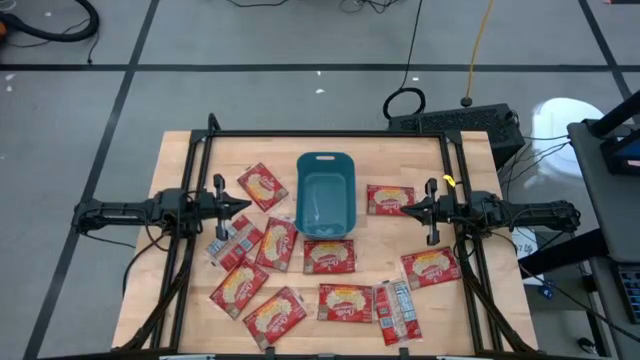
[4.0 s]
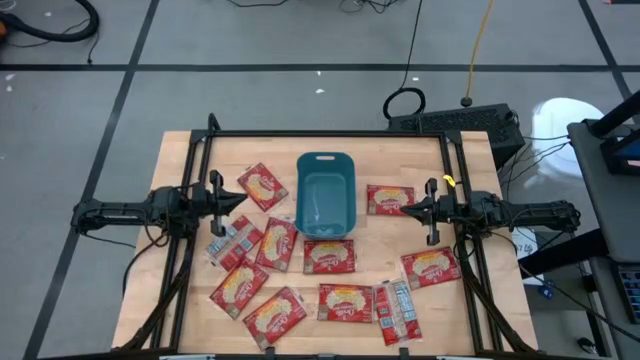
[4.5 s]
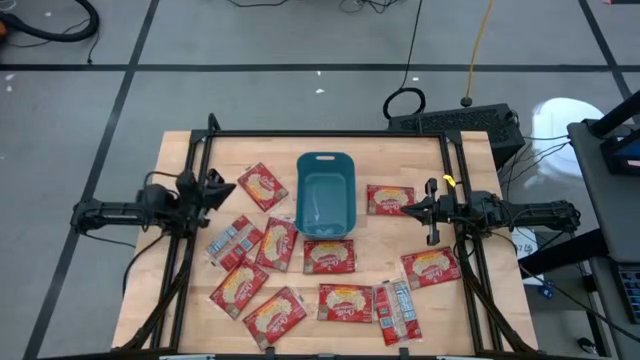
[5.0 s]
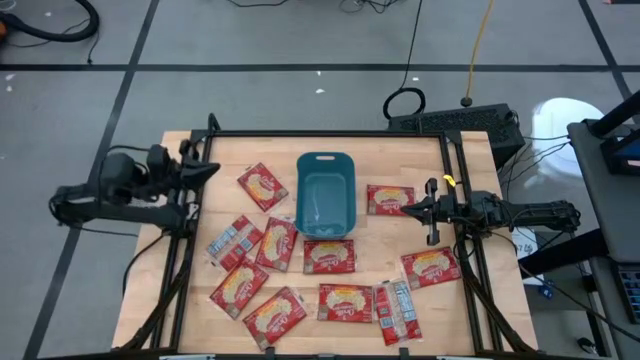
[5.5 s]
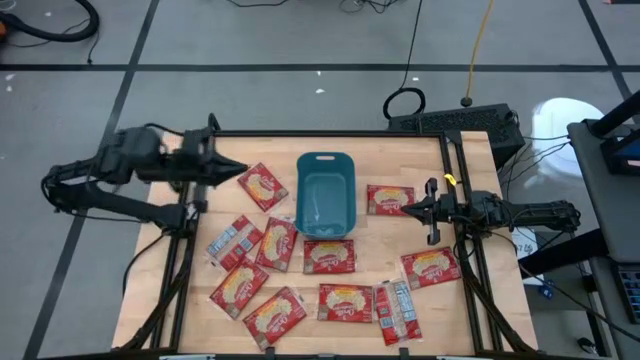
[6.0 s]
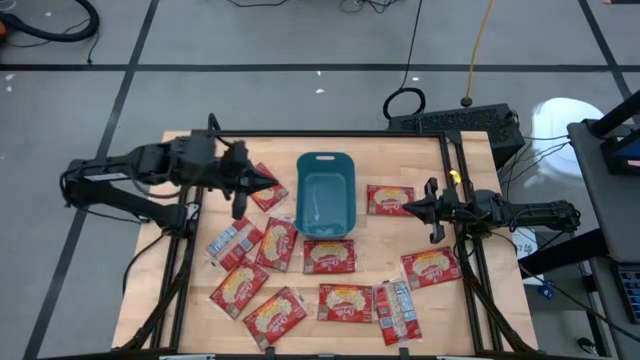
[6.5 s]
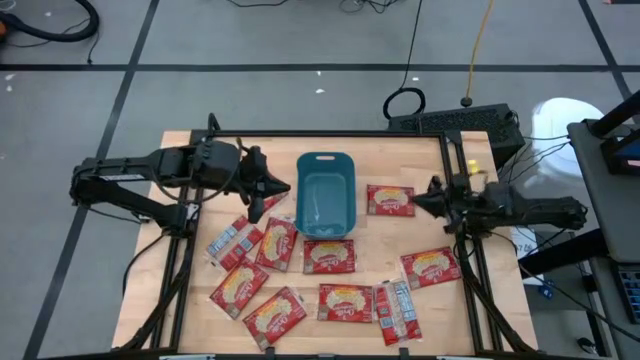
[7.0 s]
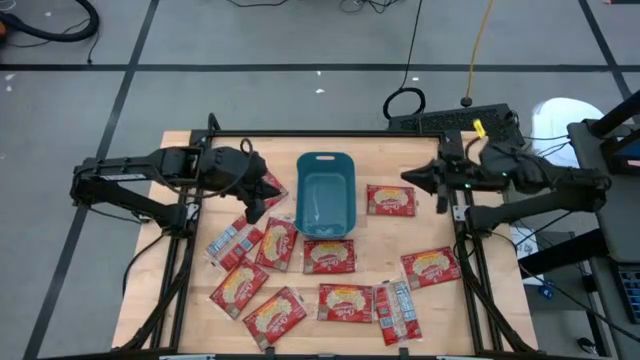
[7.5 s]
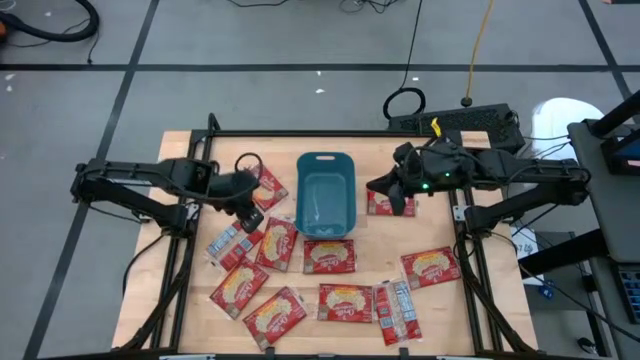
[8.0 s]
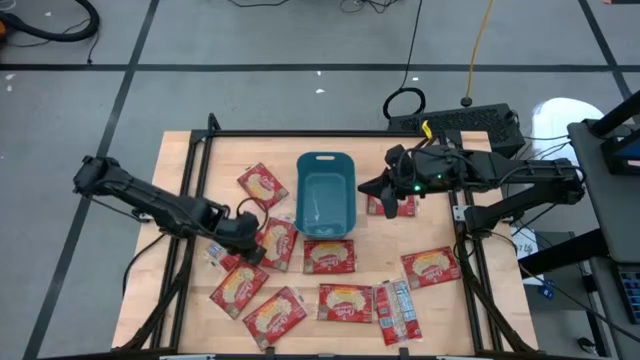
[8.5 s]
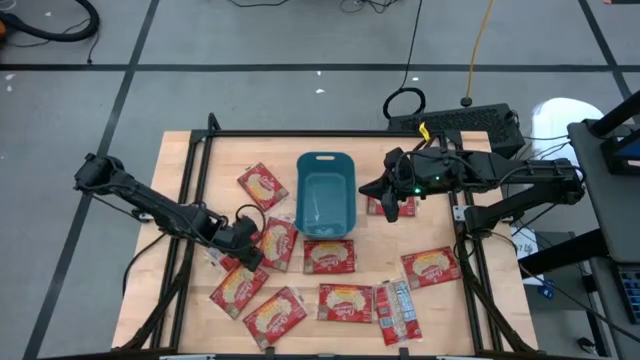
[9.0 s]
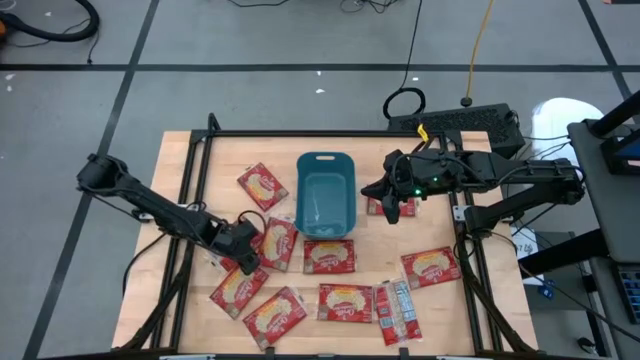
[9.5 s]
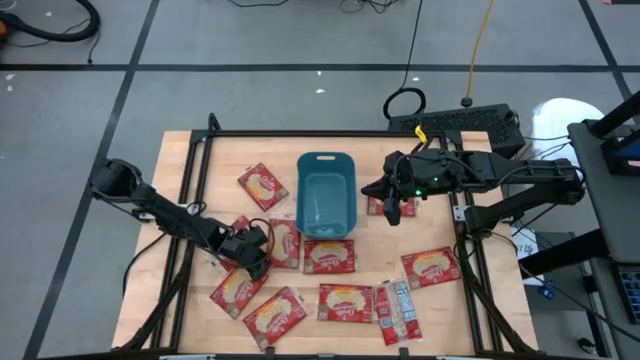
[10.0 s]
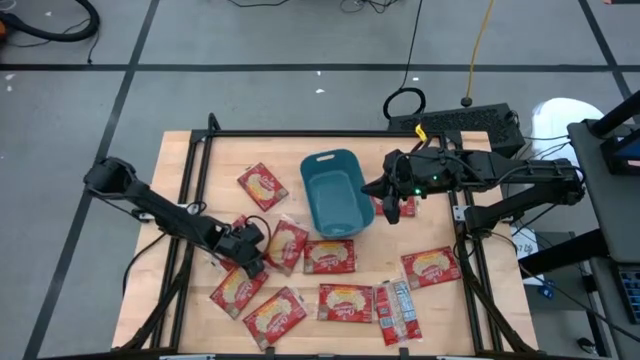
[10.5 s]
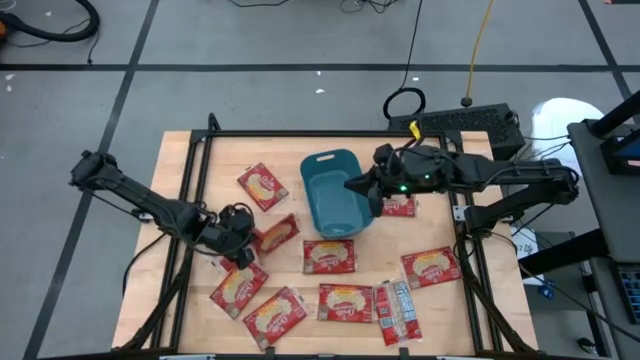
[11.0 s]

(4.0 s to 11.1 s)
Task: Sort popcorn bags into baskets
Put the red popcorn bag into the blue bin

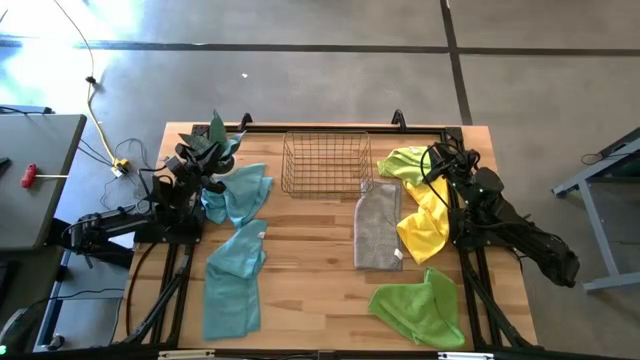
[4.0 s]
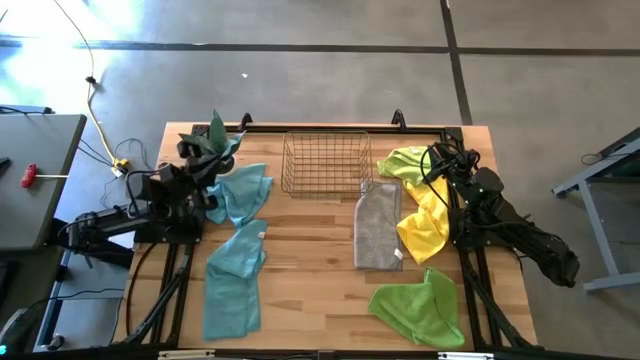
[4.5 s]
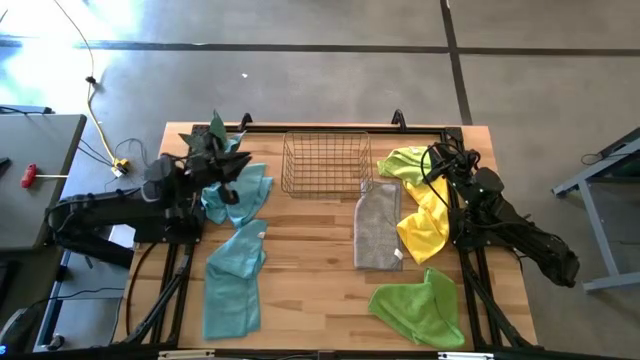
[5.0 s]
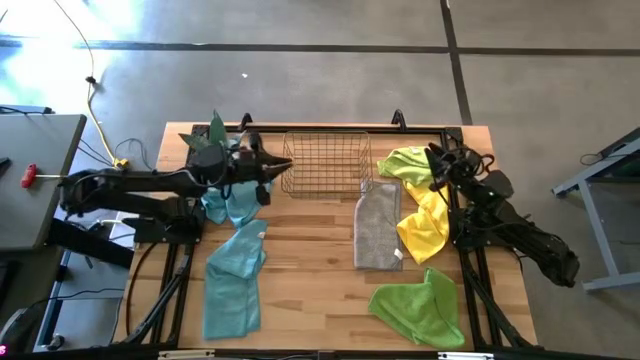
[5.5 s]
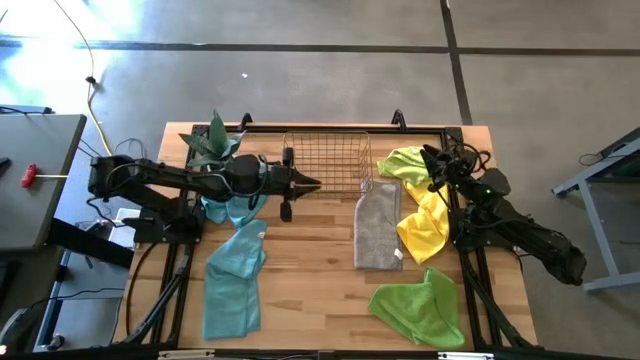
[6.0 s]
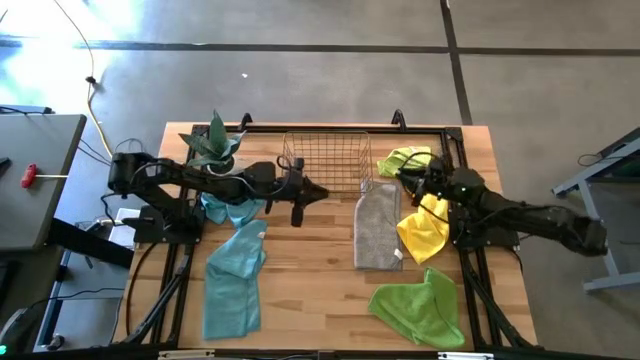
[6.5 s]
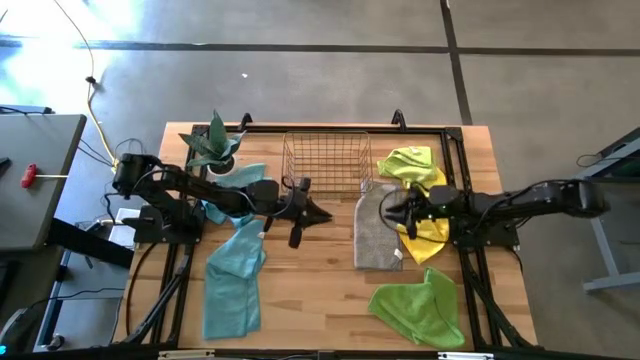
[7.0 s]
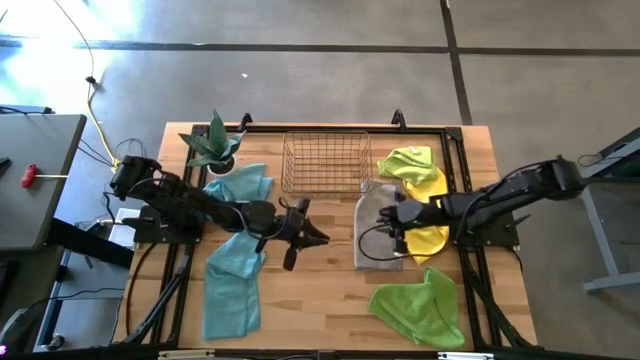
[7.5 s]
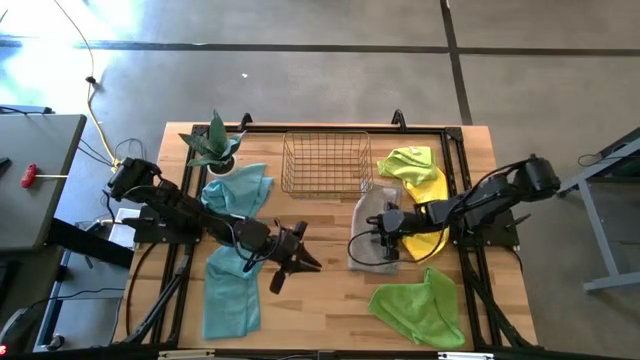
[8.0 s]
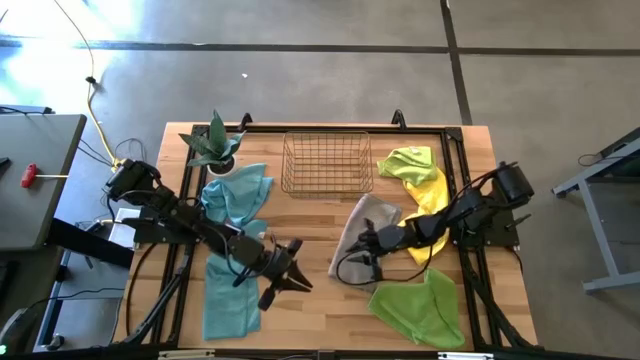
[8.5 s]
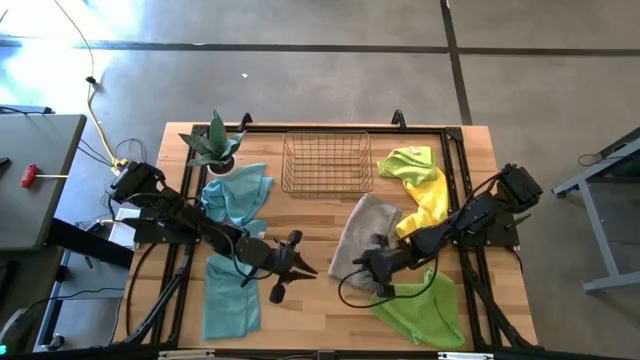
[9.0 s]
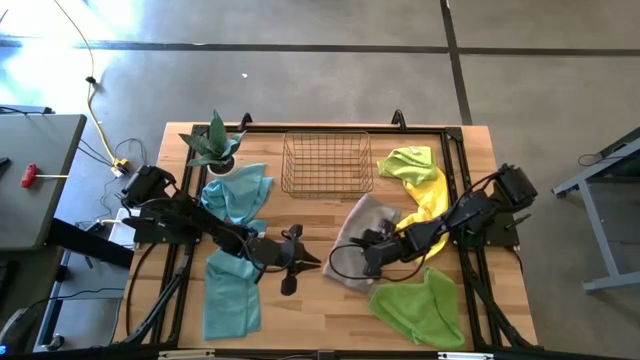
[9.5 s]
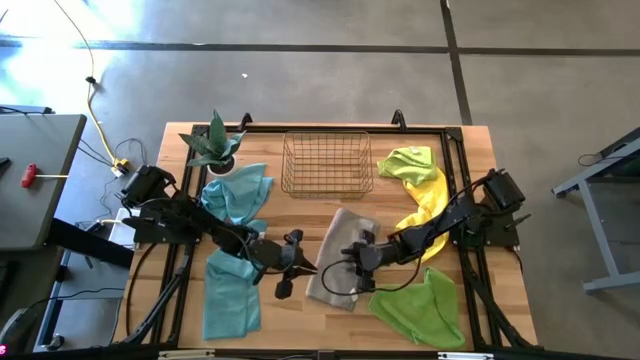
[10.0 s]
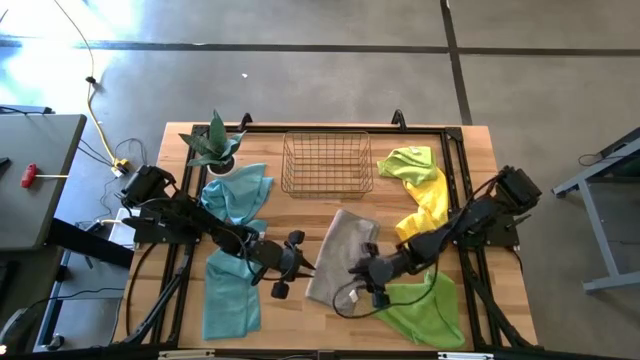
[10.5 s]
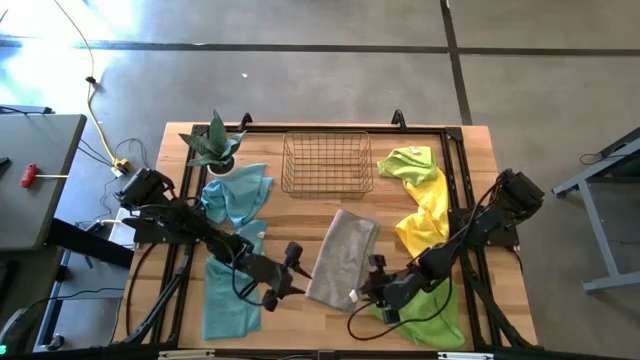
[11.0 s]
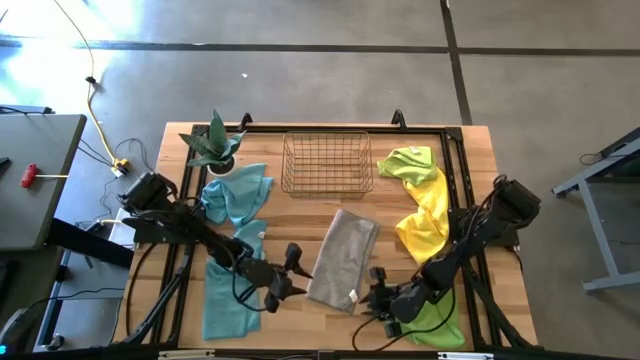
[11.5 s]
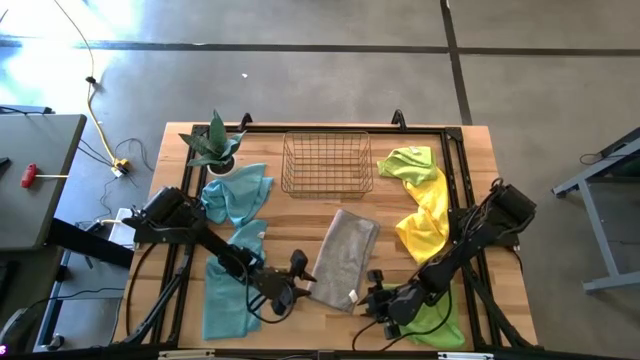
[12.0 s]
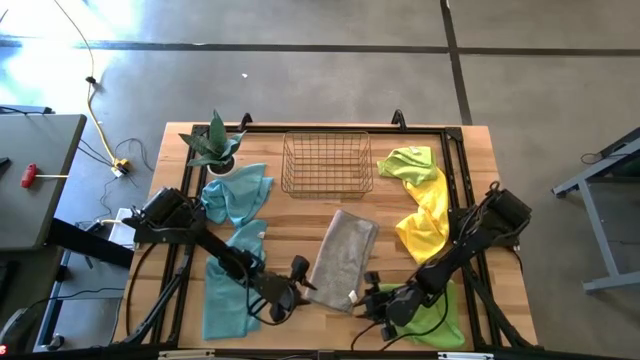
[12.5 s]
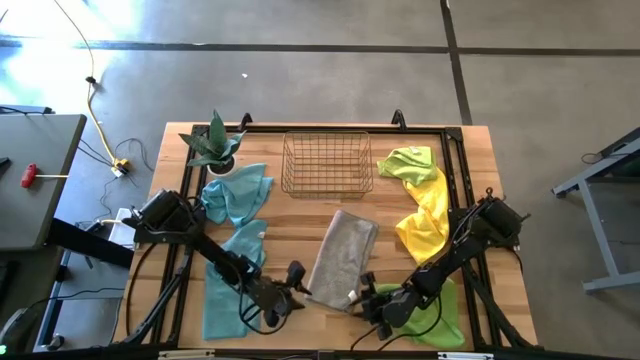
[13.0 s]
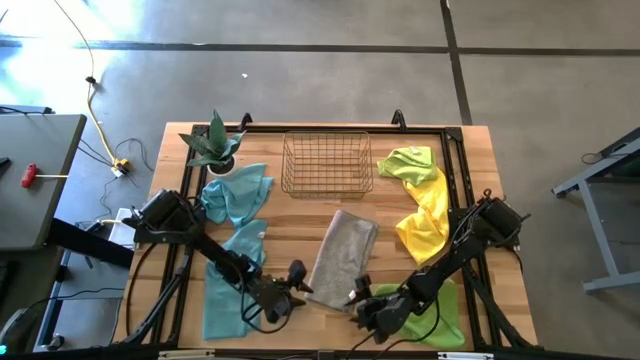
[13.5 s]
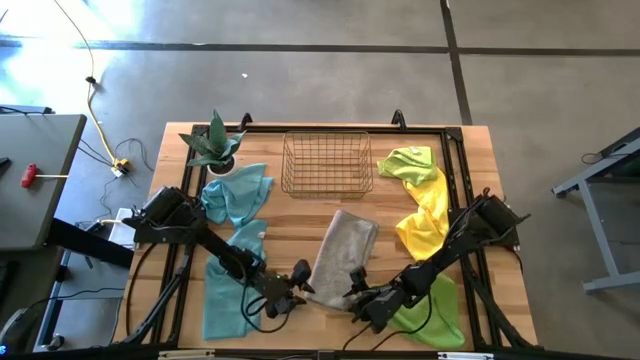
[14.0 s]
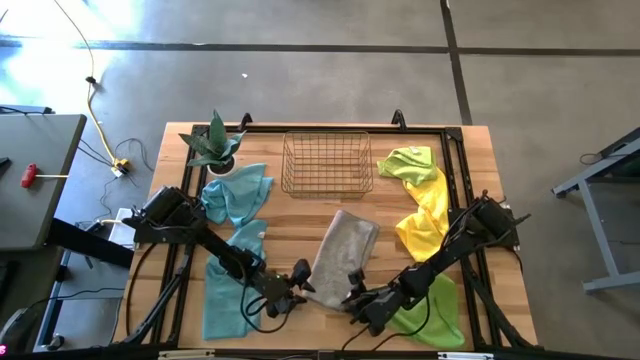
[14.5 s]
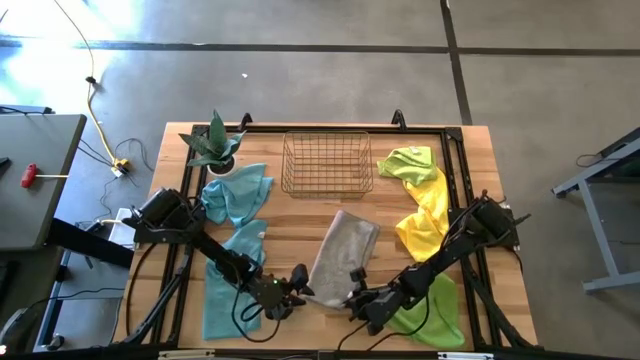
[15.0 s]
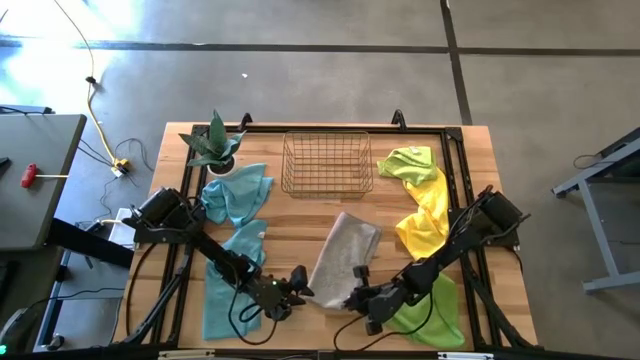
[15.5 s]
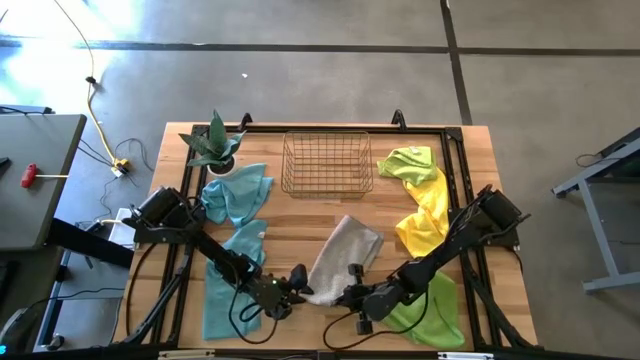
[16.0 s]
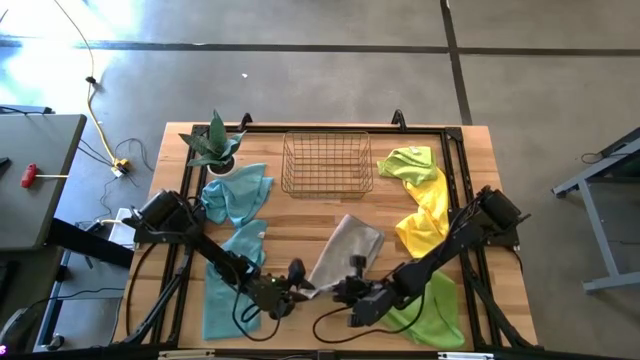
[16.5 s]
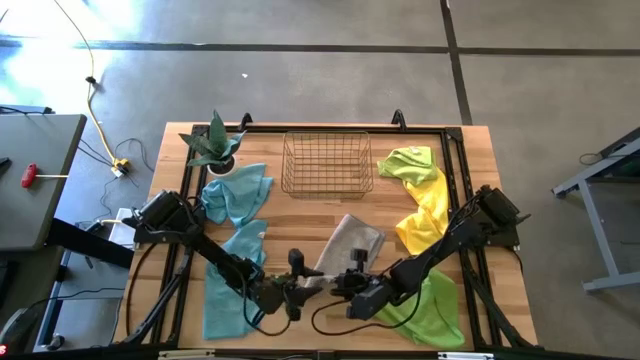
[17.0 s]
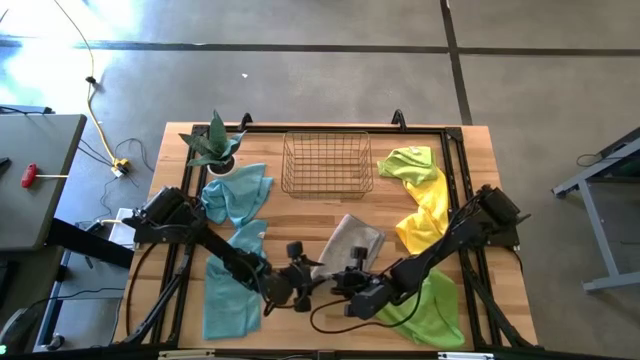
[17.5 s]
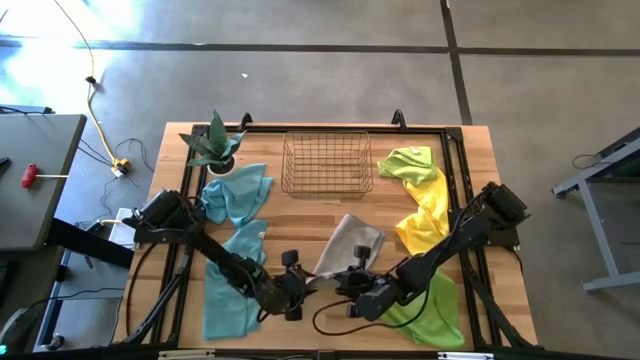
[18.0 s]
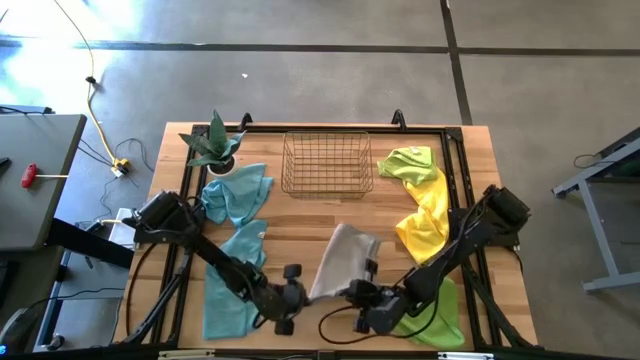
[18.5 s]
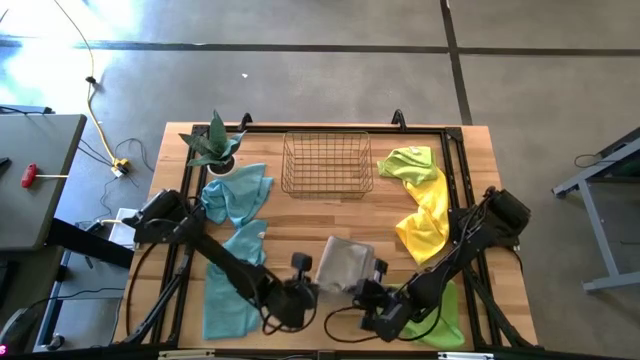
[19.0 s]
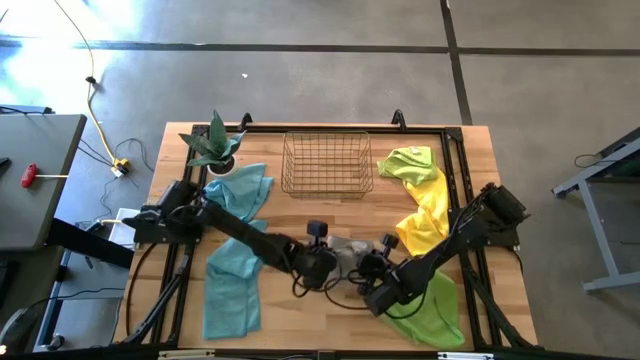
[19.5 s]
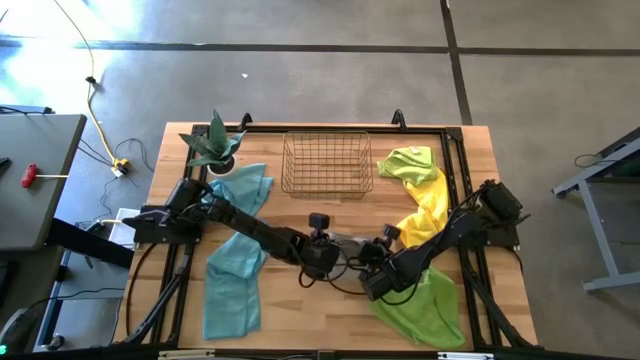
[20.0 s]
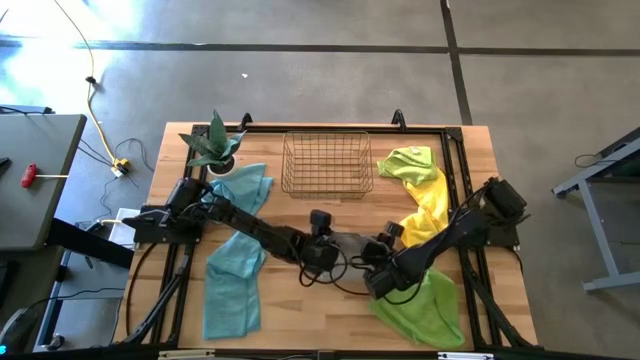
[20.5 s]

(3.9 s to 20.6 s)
Task: Fold microfiber towels
Fold the gray microfiber towel
